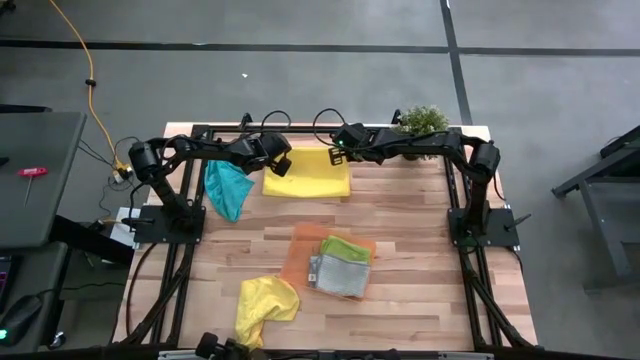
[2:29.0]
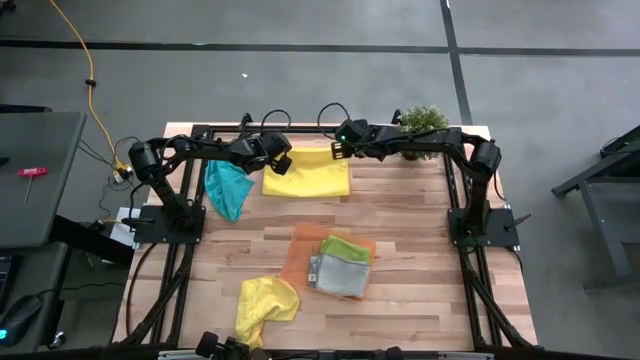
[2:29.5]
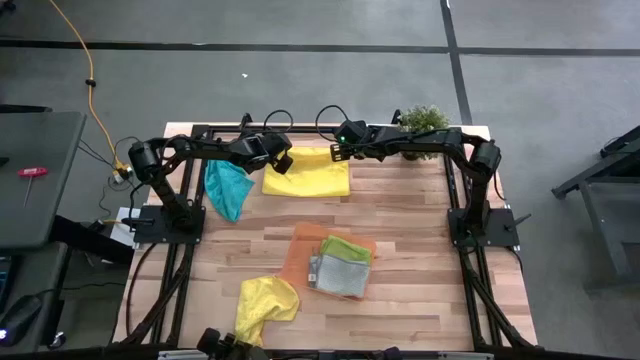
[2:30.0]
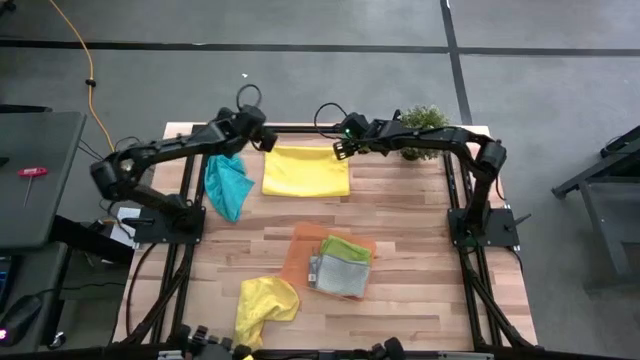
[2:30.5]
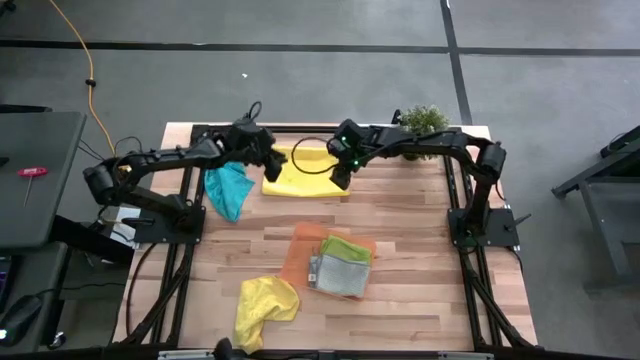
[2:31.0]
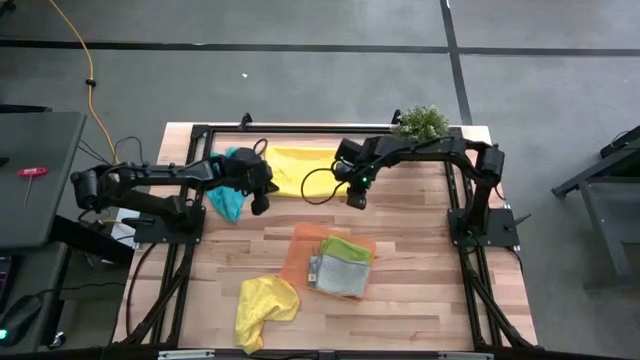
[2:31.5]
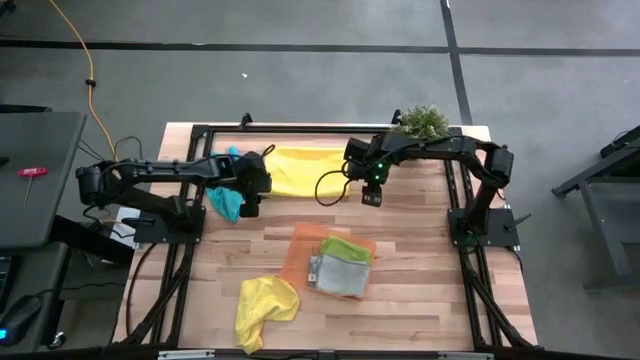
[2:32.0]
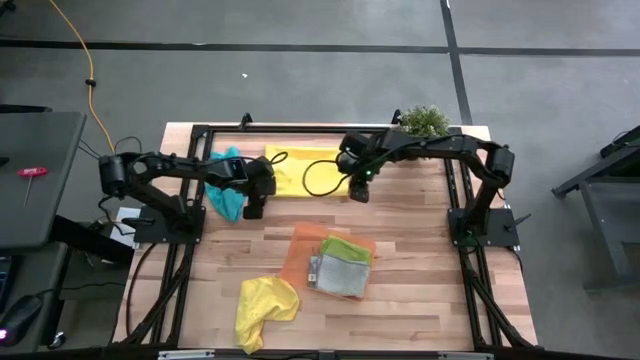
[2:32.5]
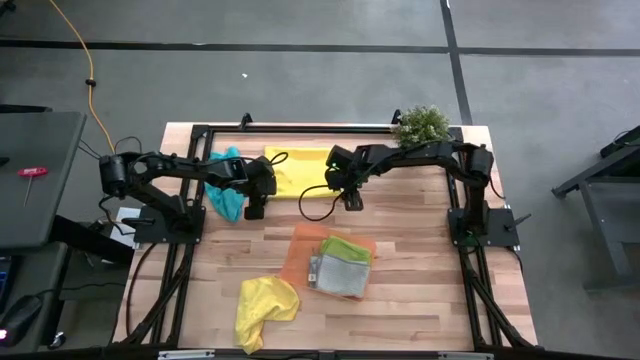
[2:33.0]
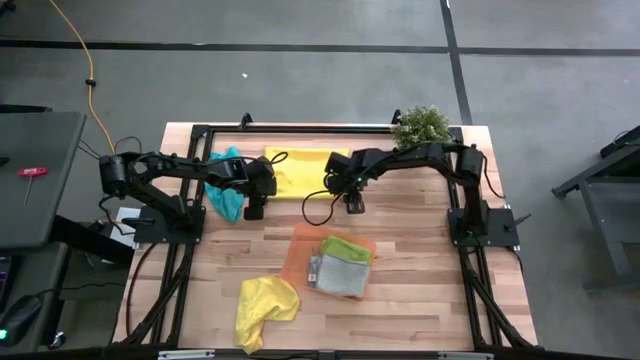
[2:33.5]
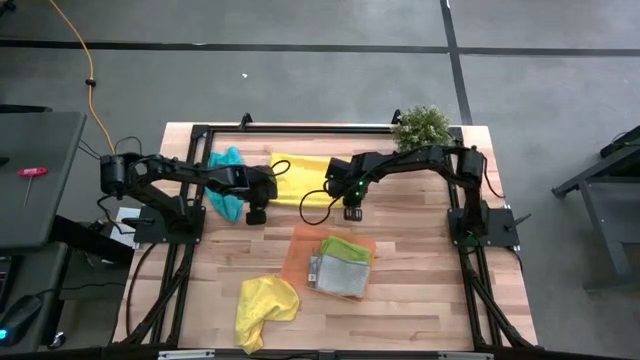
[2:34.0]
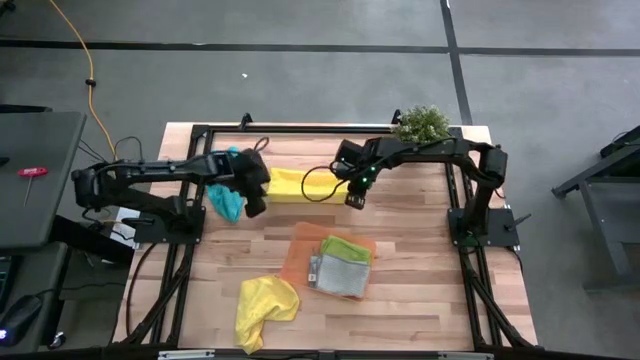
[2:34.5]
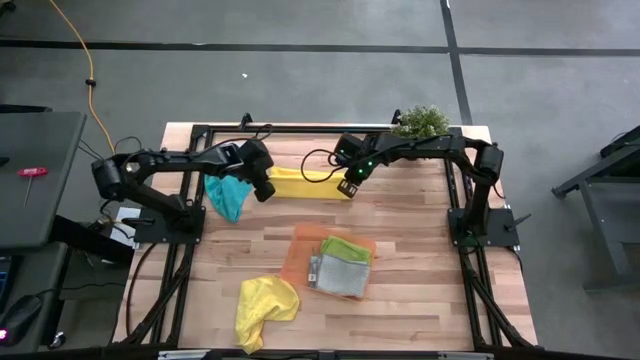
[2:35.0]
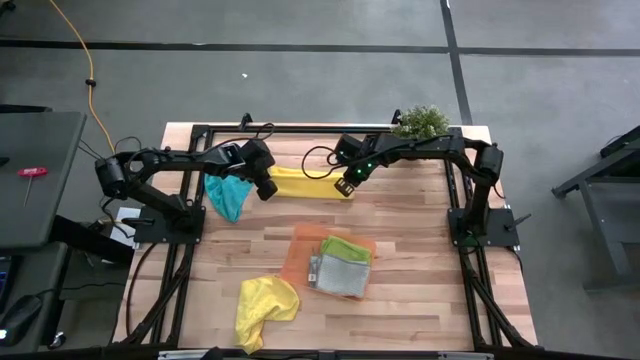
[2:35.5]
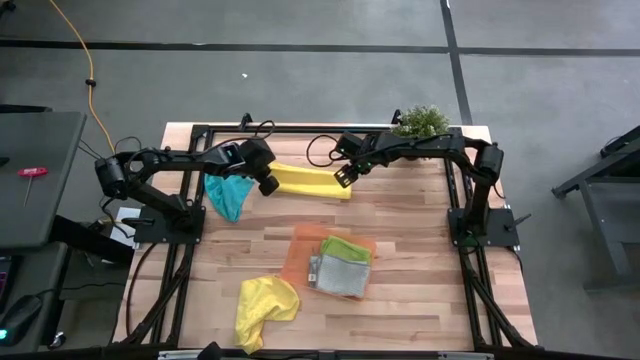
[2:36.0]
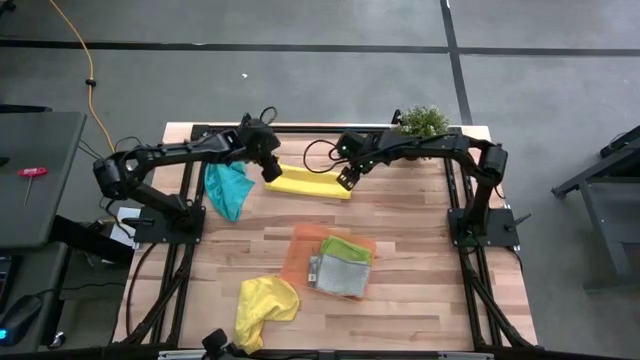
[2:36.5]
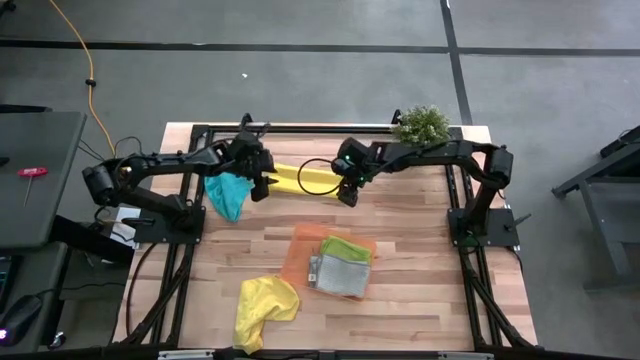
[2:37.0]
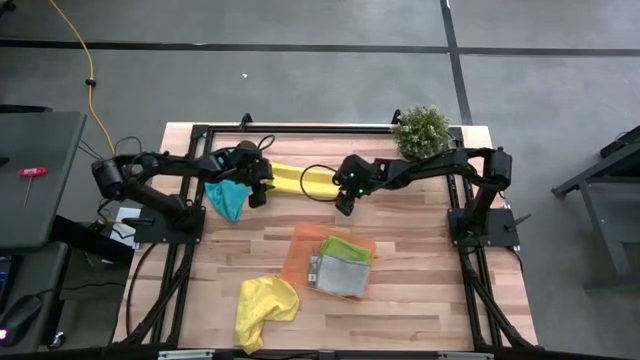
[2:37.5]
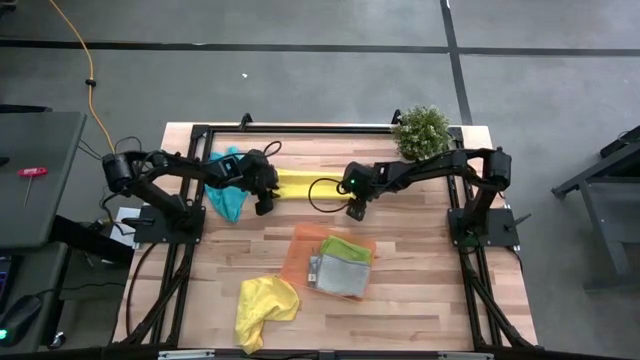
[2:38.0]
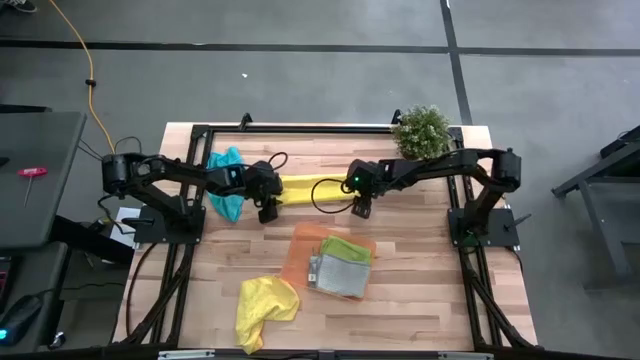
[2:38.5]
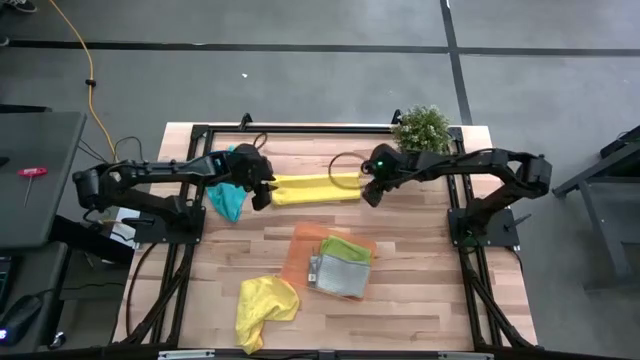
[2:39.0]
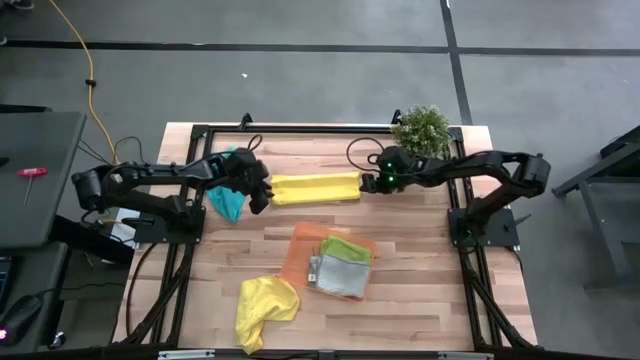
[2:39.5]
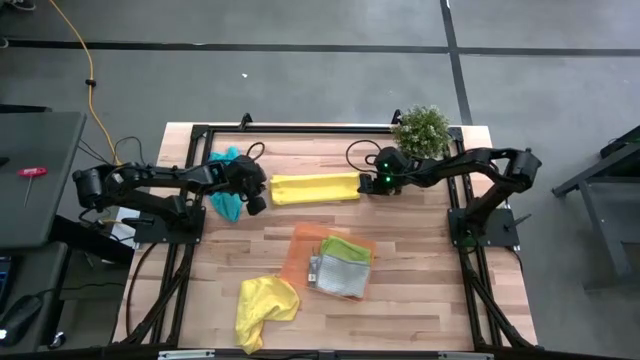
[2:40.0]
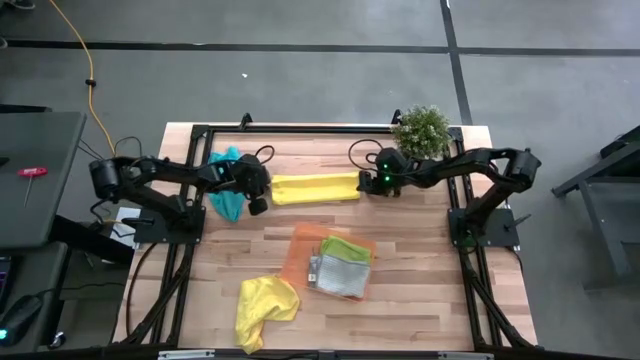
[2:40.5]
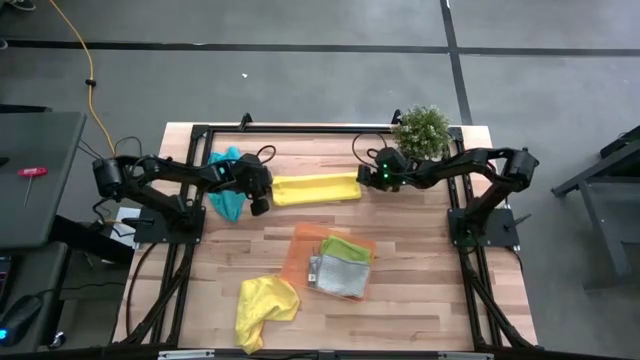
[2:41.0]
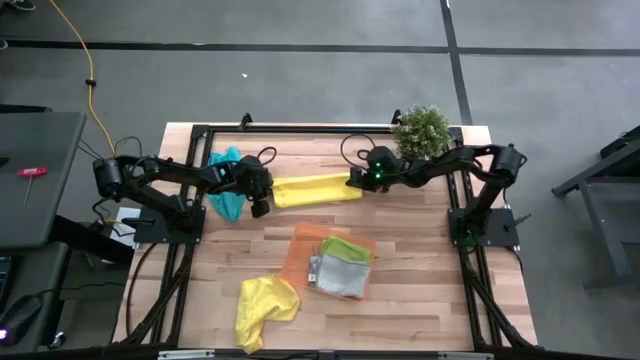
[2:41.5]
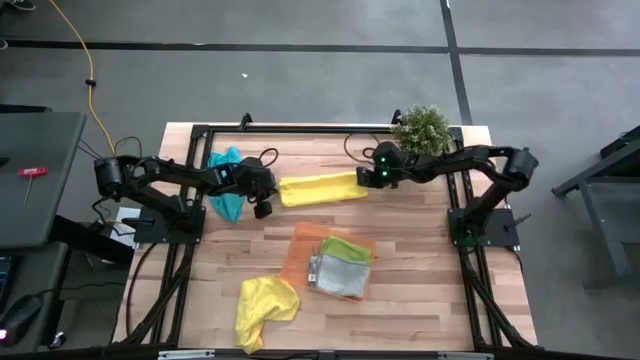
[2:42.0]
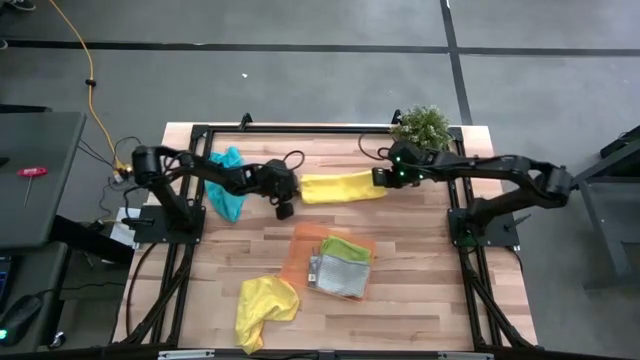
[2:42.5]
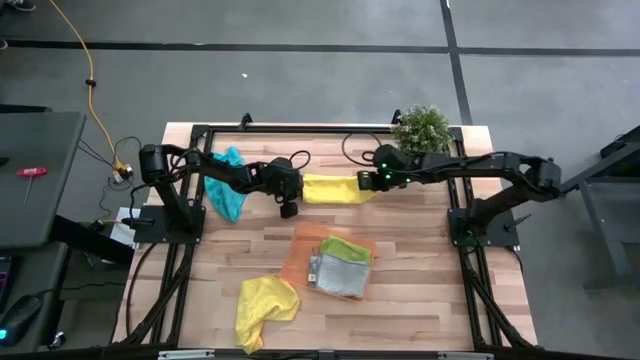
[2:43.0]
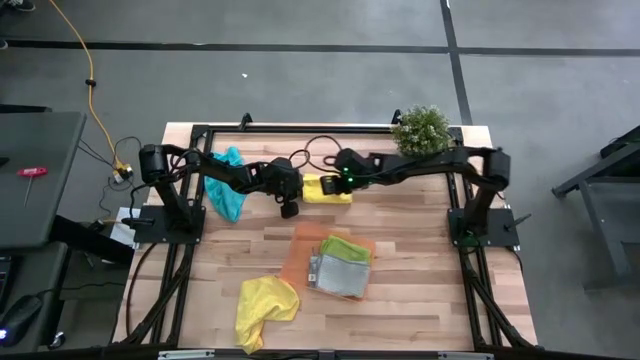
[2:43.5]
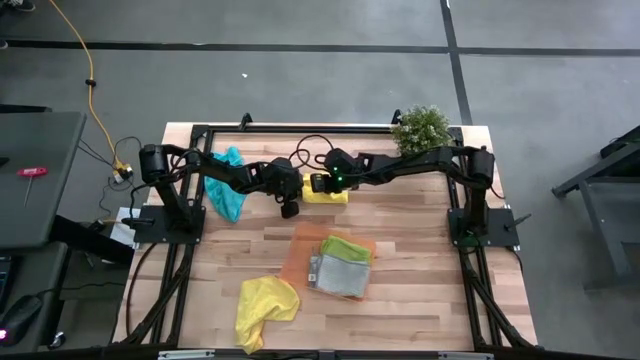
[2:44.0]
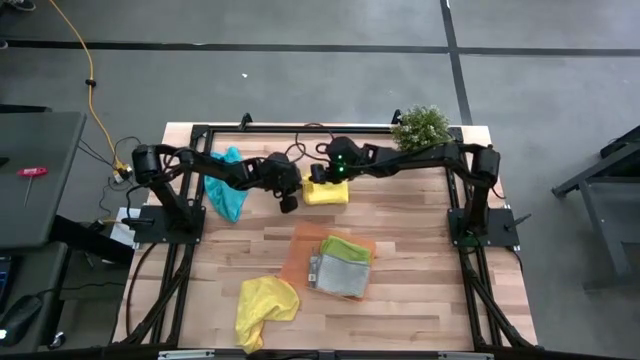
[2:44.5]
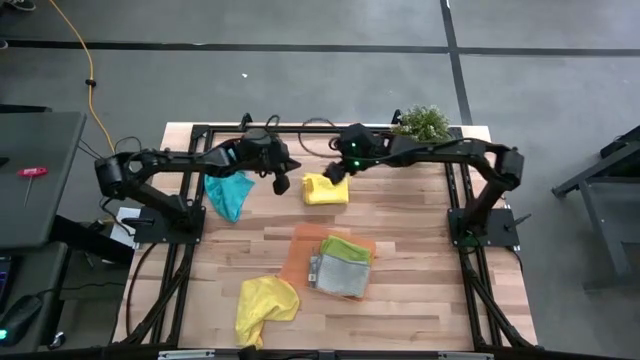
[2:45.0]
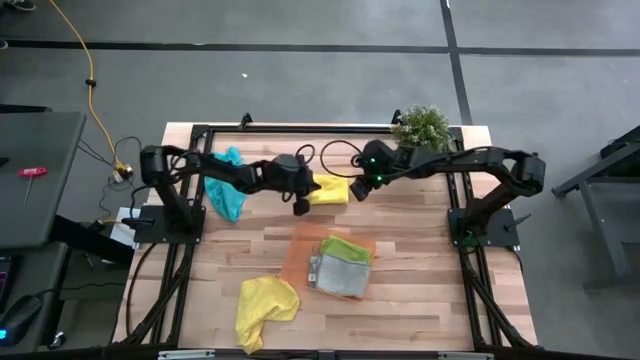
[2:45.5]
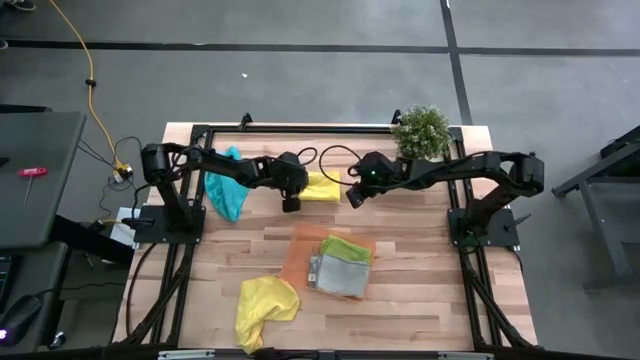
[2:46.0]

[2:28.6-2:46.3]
Task: Fold microfiber towels
Fold the top yellow towel
